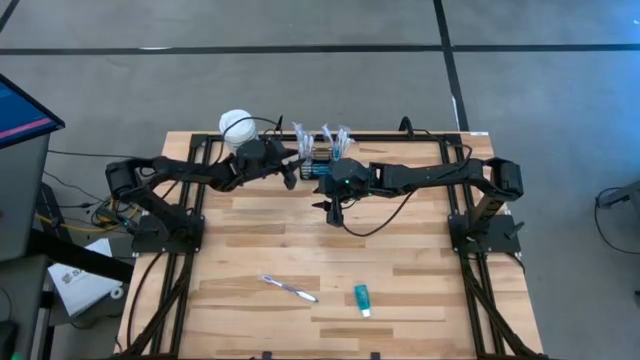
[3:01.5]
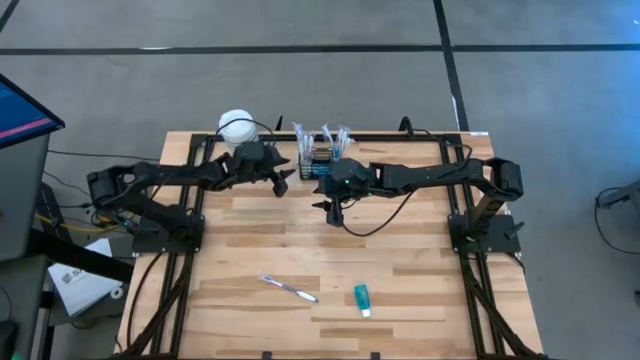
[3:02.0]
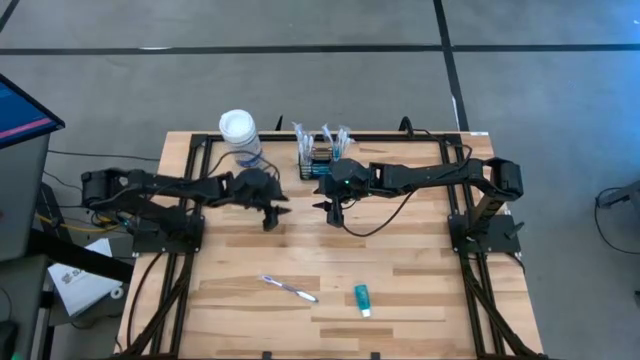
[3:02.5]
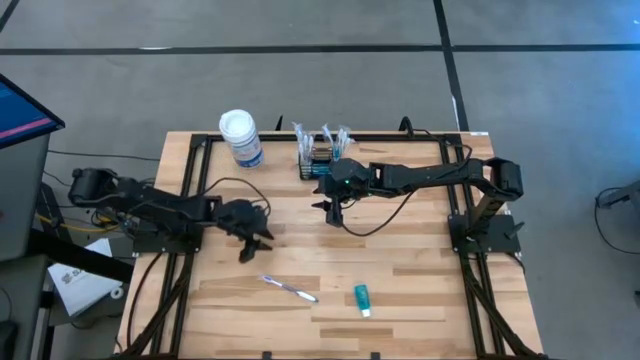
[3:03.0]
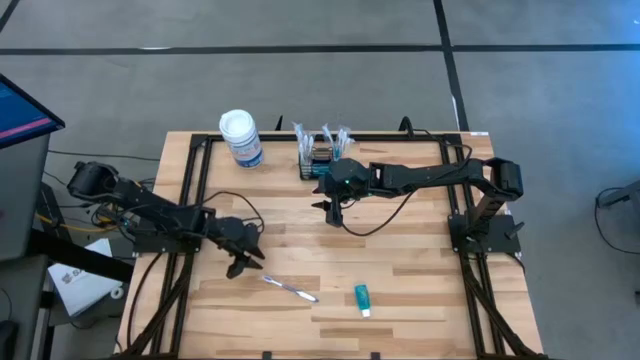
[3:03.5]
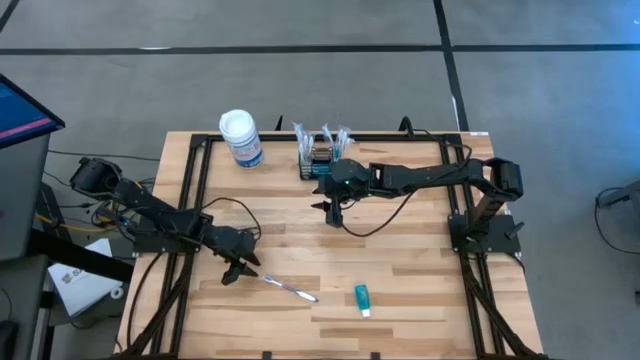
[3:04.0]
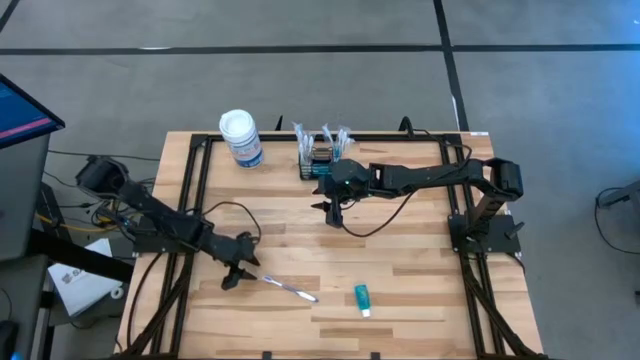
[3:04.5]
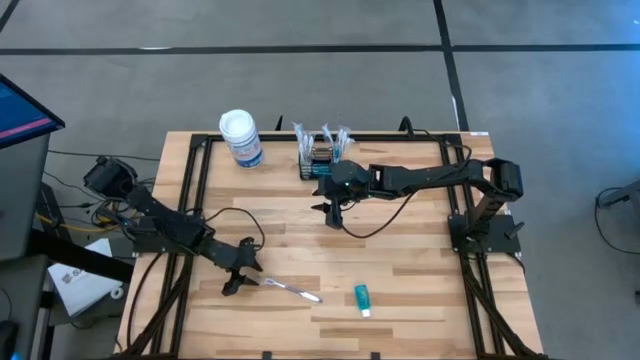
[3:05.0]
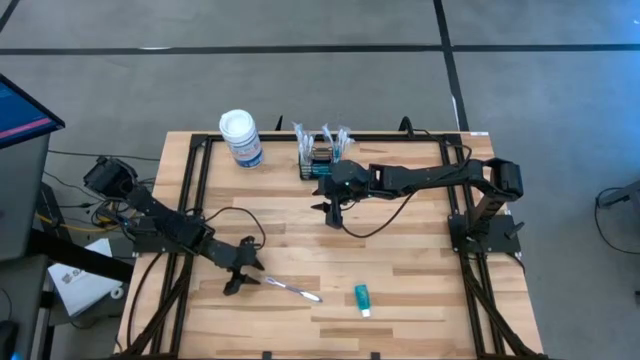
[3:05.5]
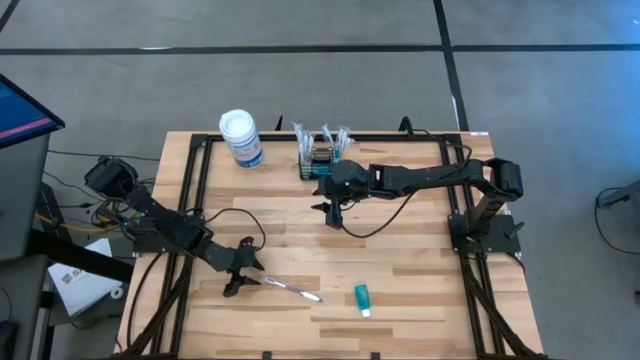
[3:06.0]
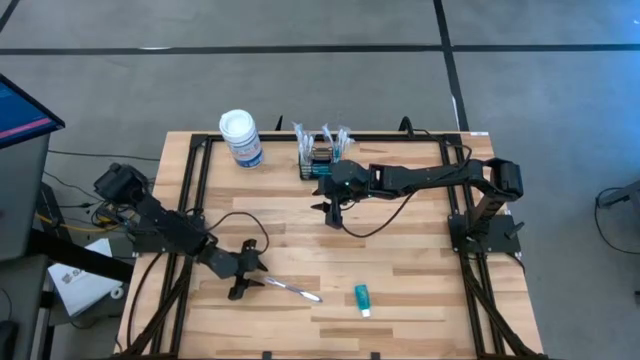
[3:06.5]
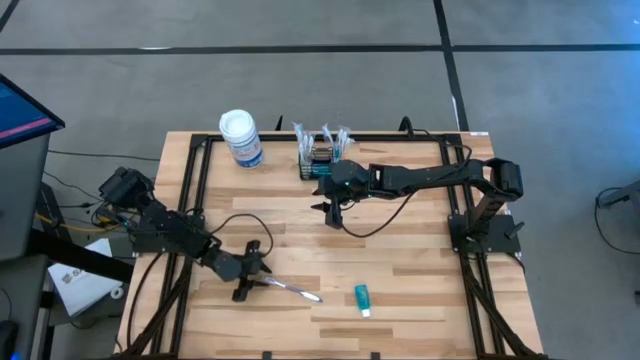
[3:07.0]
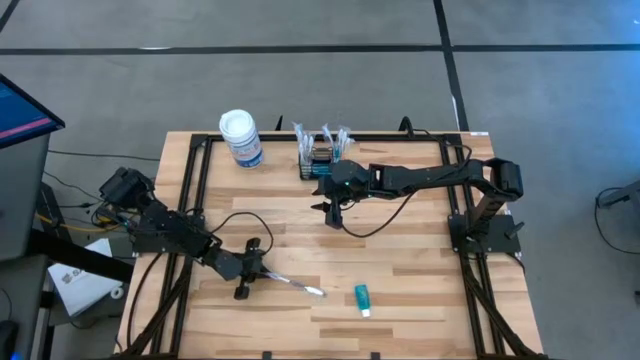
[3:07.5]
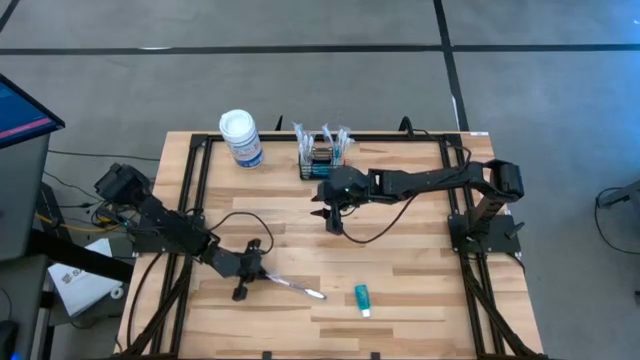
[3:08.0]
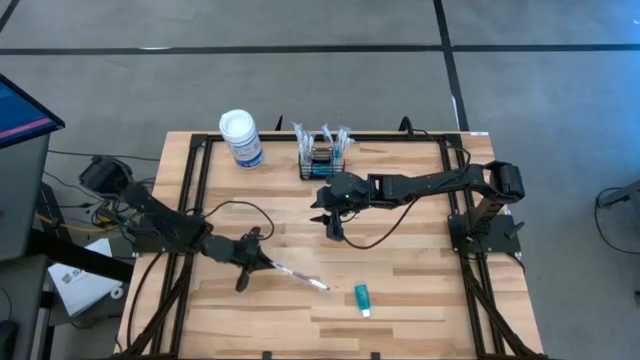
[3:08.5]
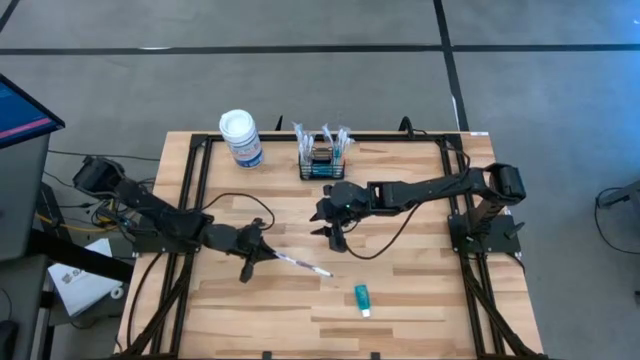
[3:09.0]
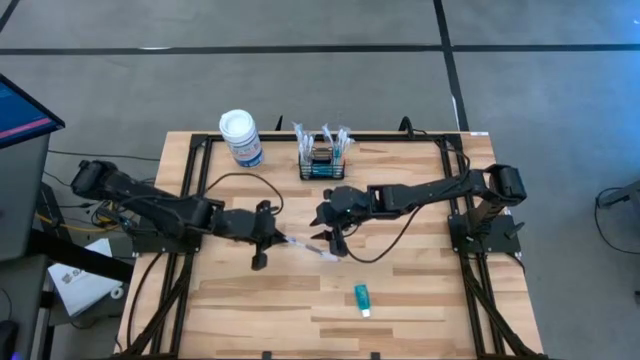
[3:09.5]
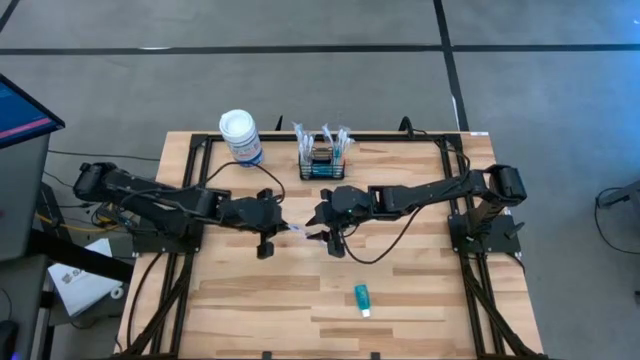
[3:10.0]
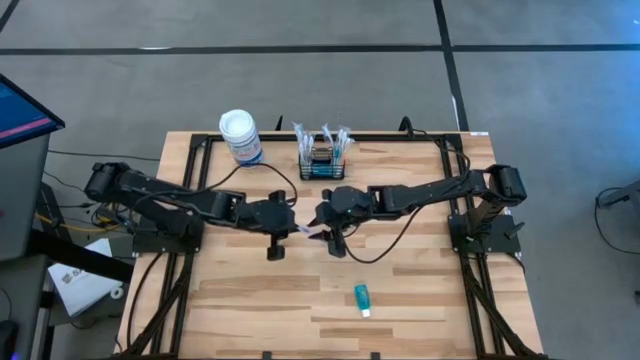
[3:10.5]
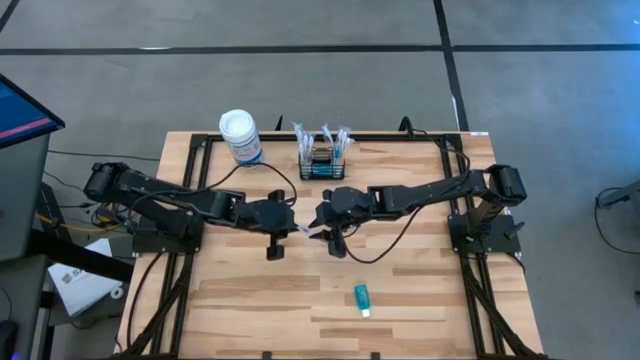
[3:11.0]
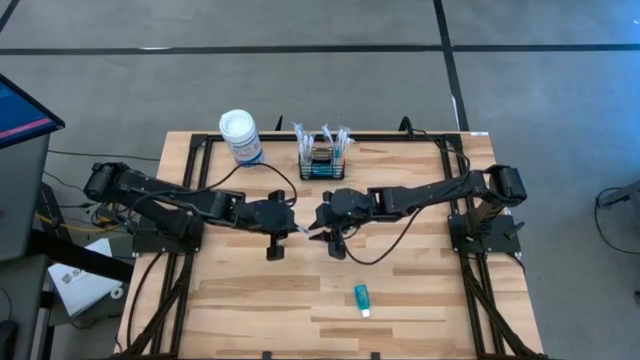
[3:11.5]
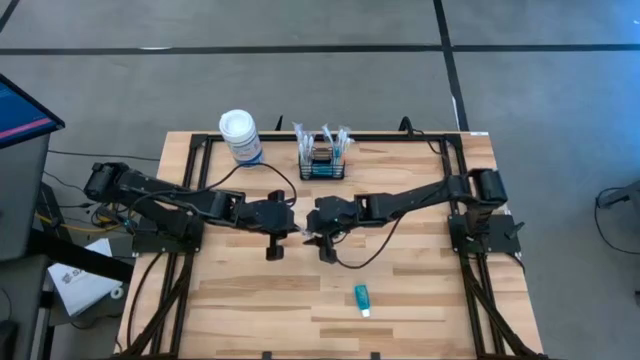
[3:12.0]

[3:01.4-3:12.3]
Task: Pick & Place toothbrushing station
Put the purple toothbrush into the black wire organizer

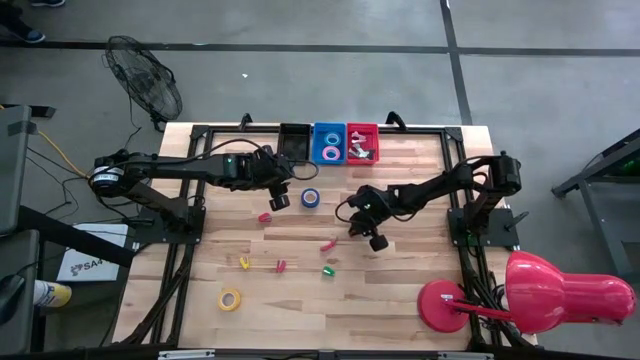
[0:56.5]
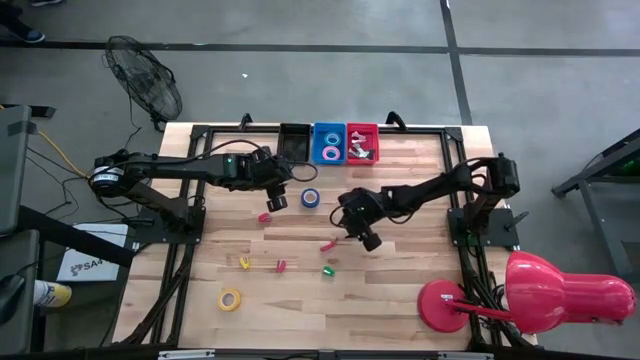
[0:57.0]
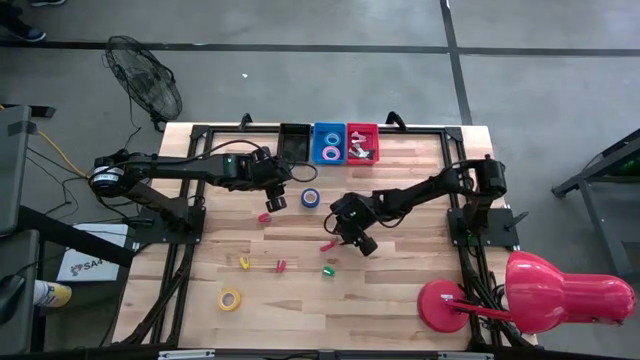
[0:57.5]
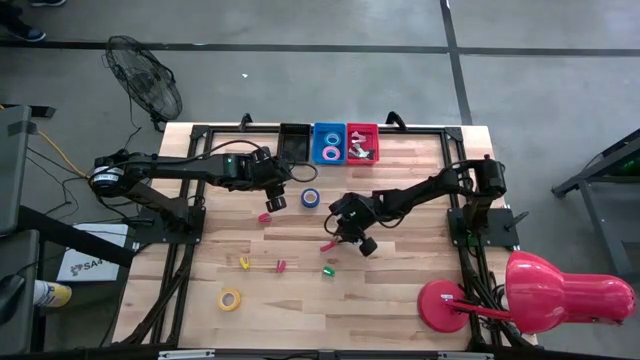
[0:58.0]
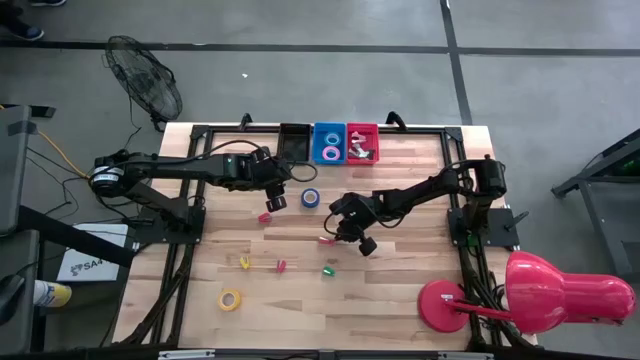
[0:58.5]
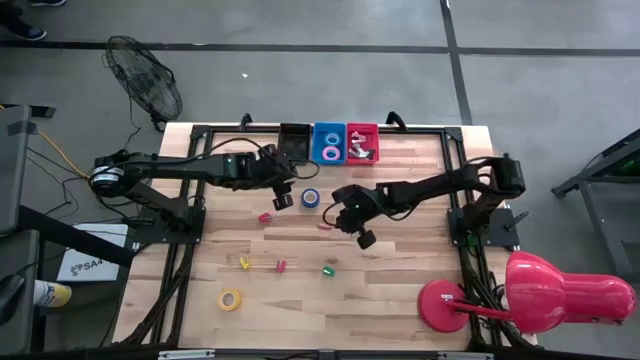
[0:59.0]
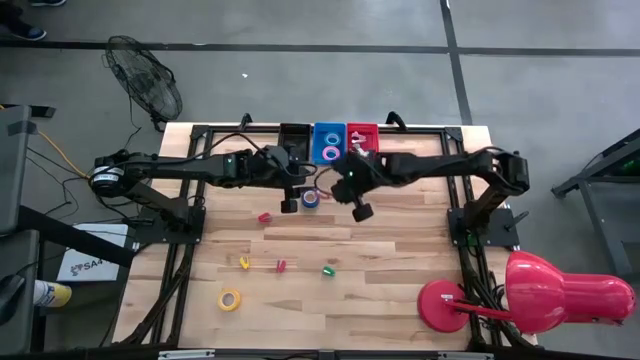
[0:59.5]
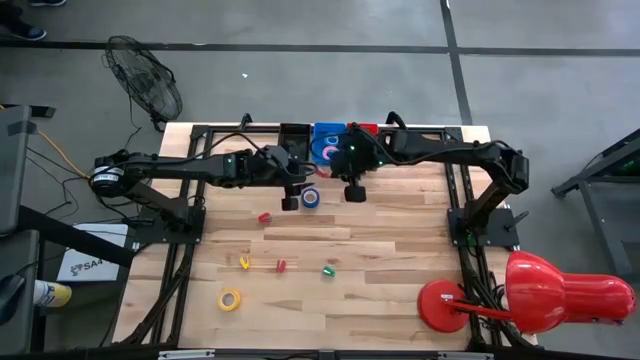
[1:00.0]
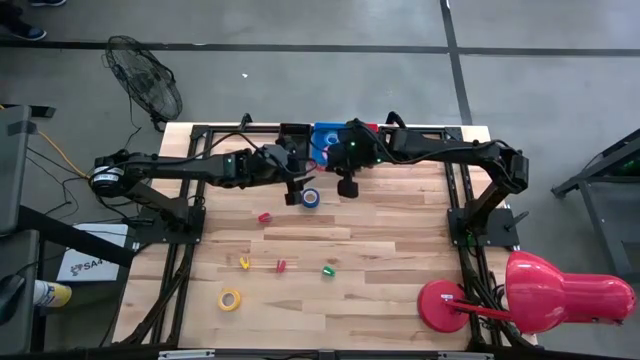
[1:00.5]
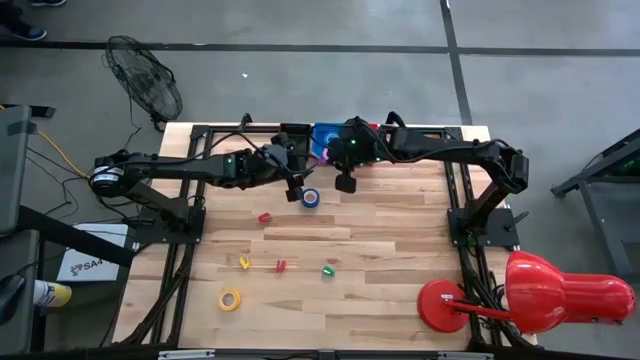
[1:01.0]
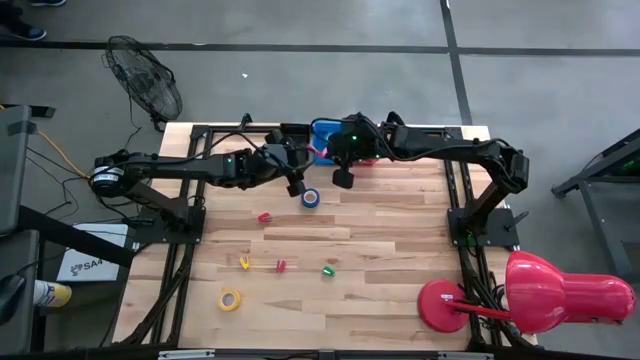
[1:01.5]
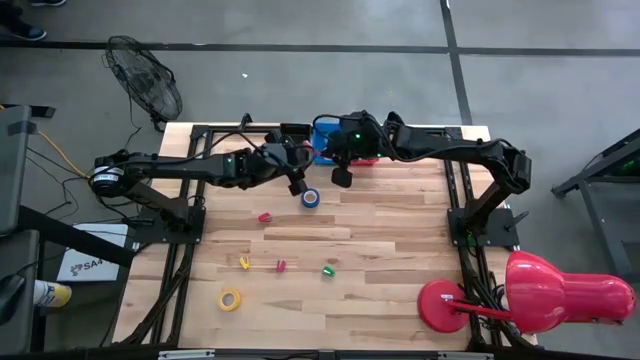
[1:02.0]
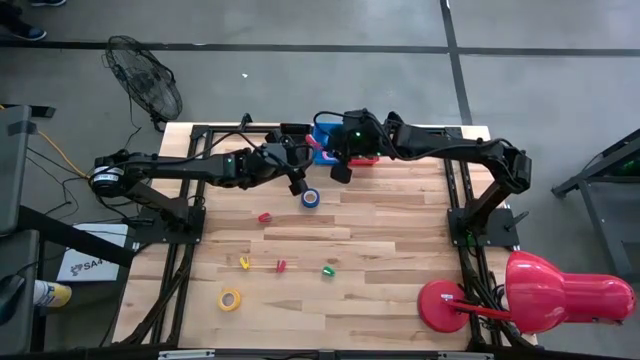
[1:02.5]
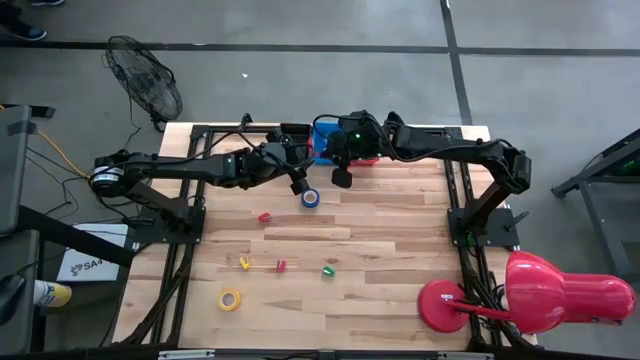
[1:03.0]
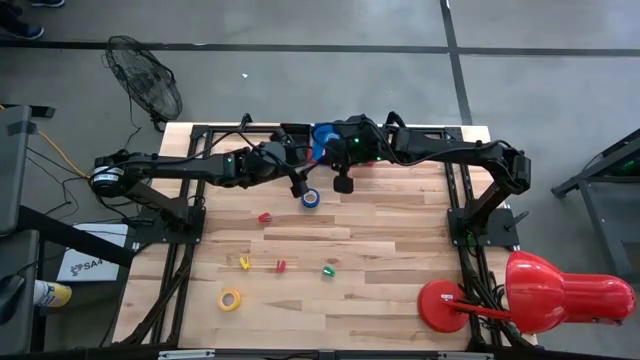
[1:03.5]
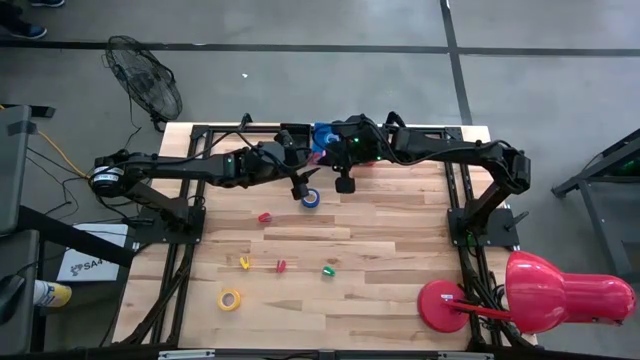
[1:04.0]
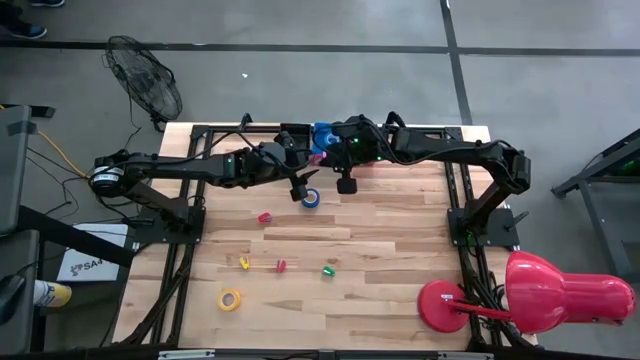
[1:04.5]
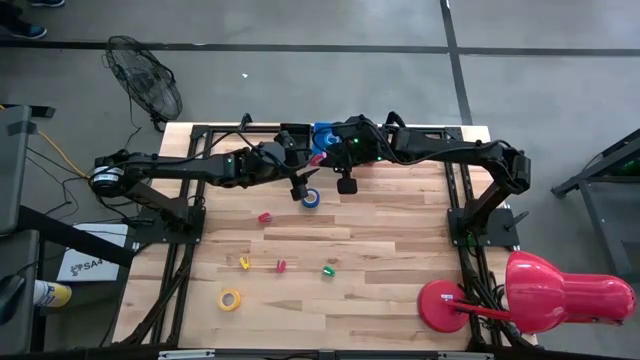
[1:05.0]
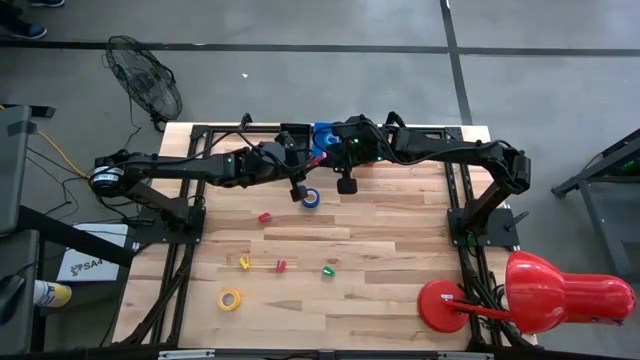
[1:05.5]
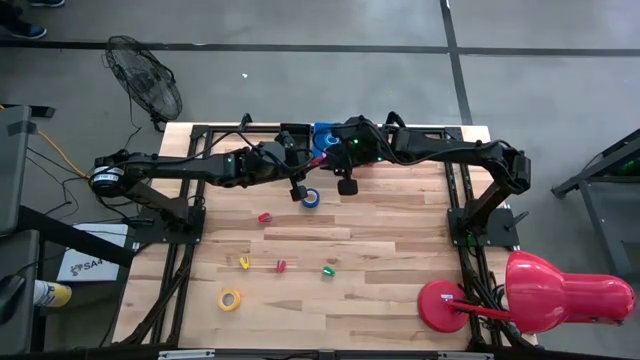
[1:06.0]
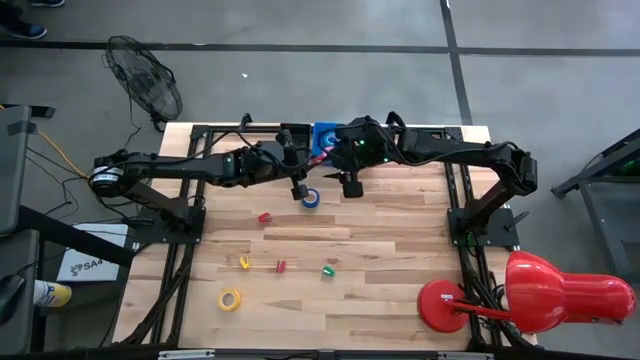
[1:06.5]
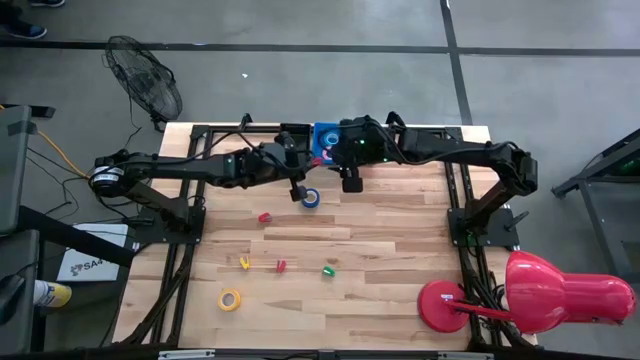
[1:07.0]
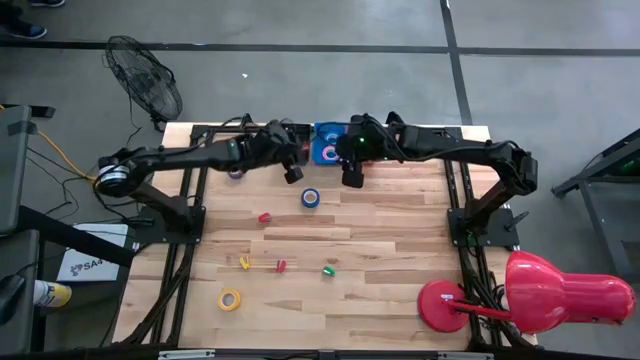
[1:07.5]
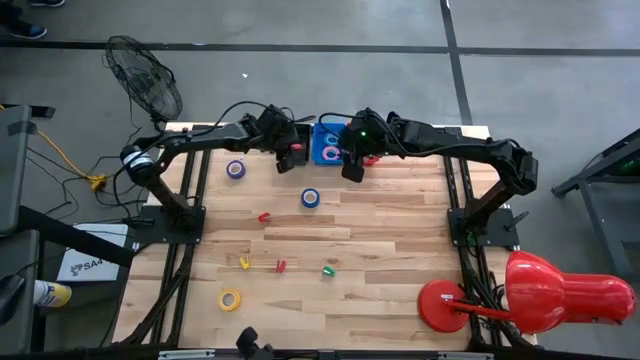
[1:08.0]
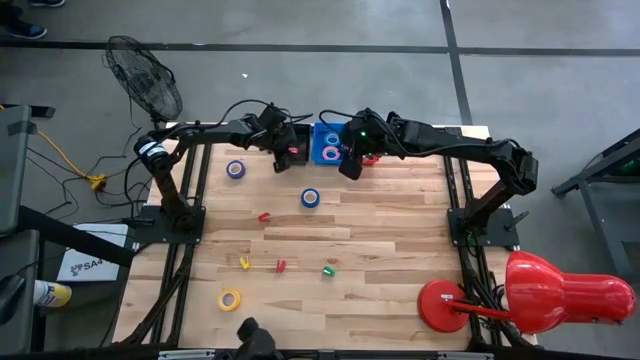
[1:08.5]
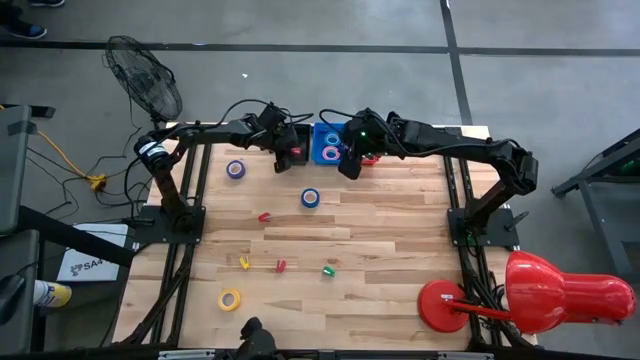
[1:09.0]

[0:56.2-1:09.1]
Task: Pick and place Stapler, Stapler remover, tape
Put the top right red stapler into the black bin
